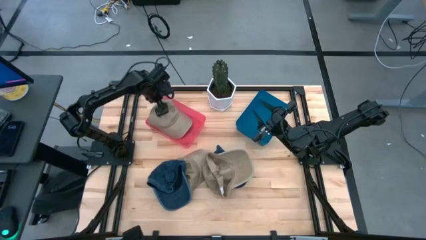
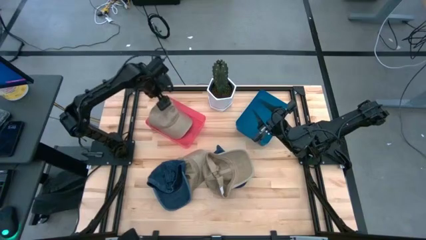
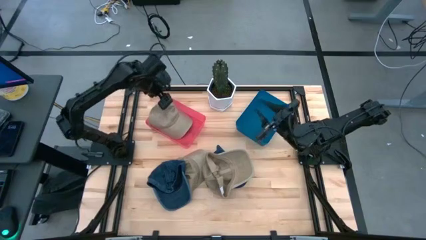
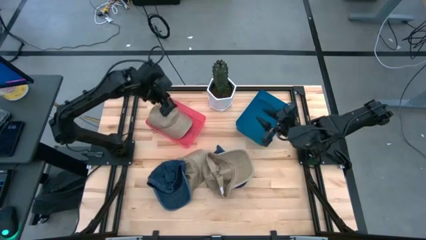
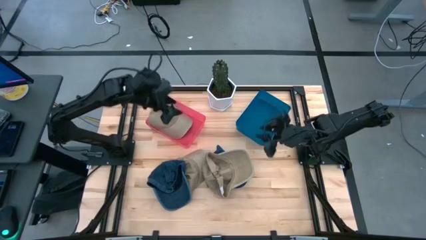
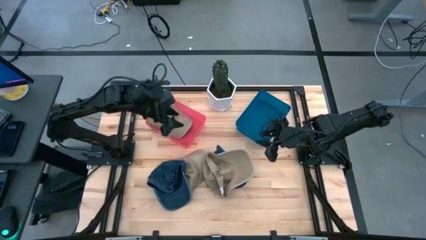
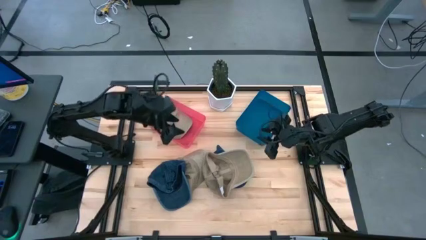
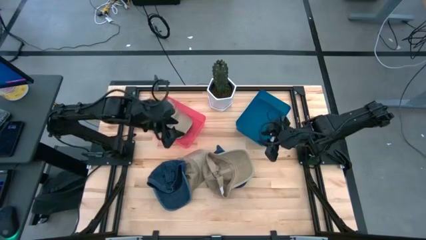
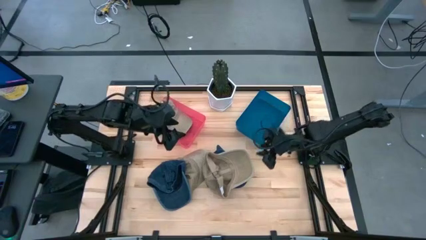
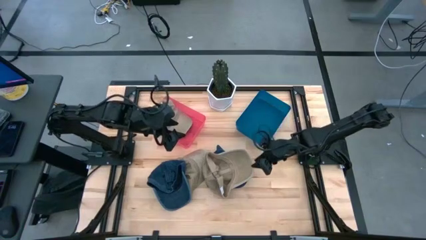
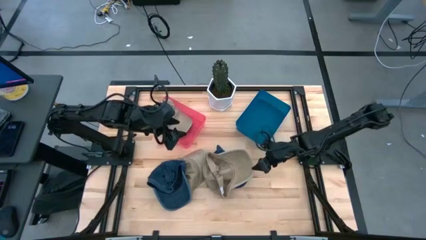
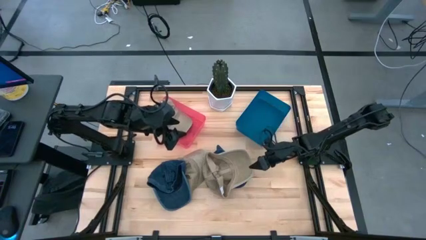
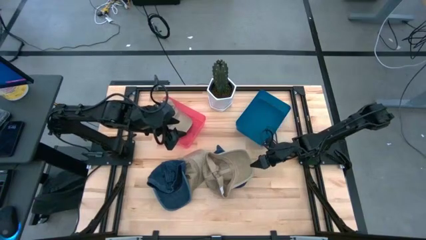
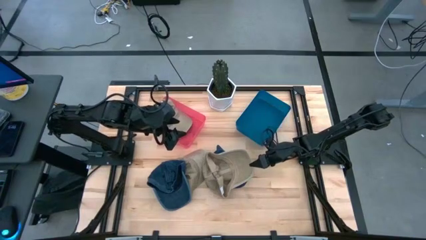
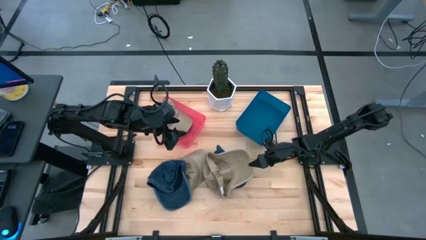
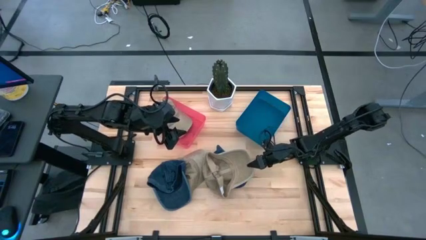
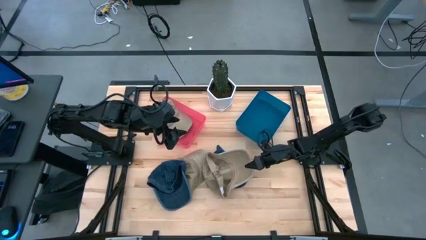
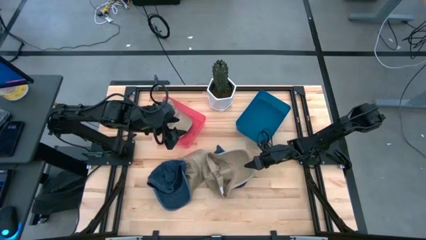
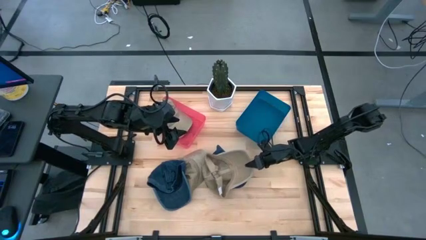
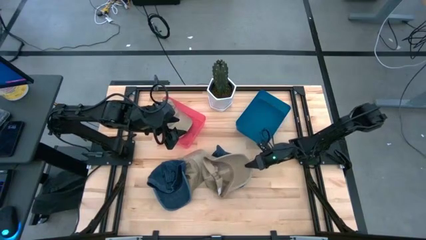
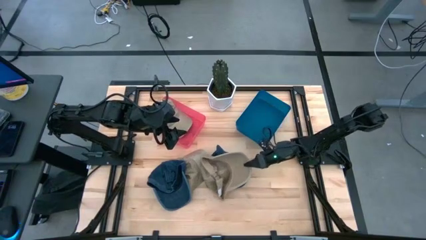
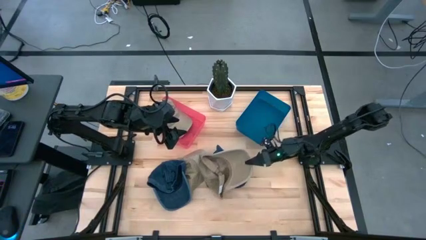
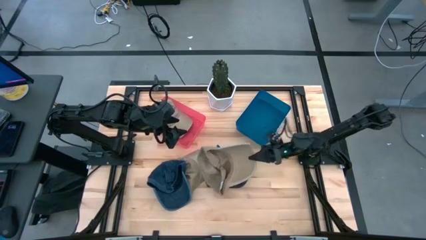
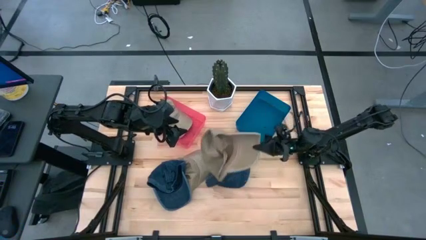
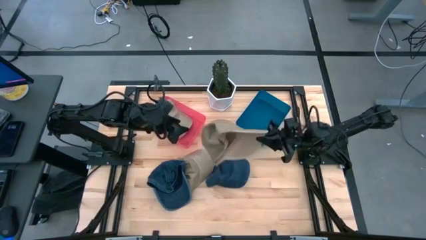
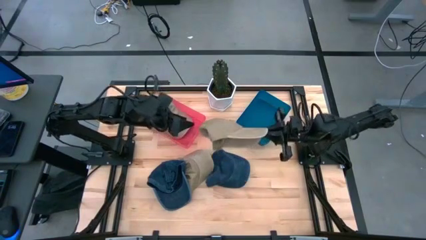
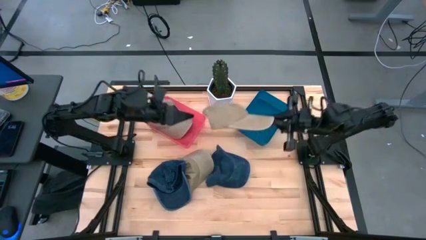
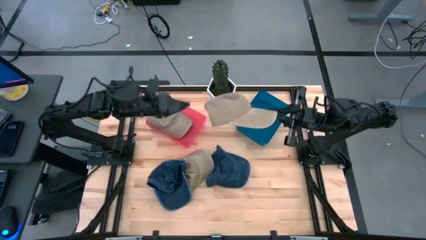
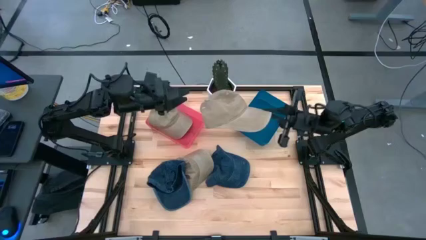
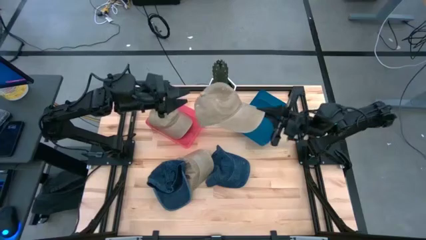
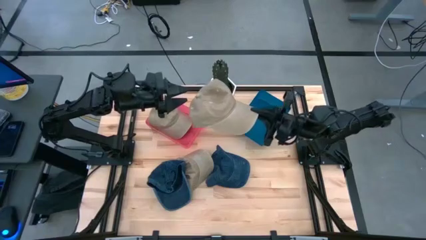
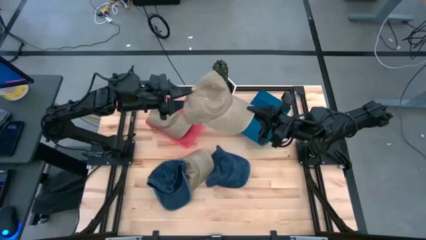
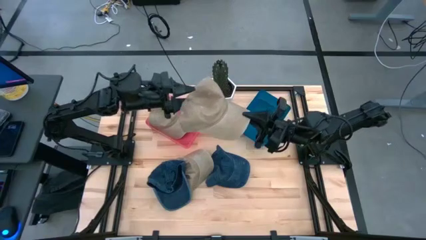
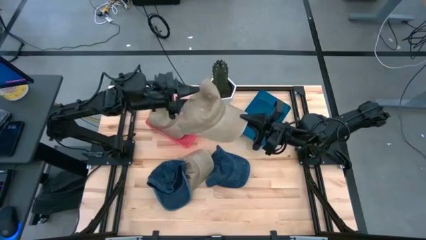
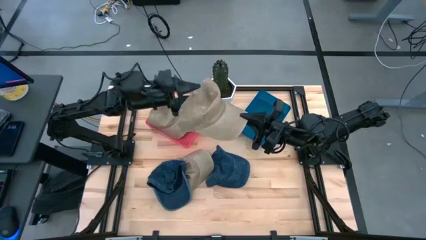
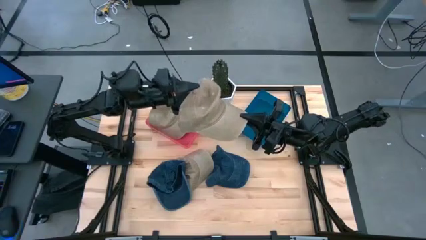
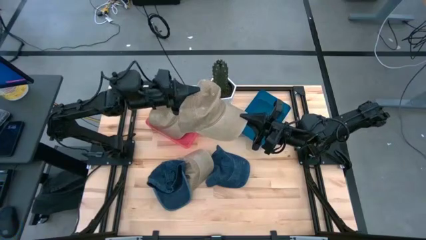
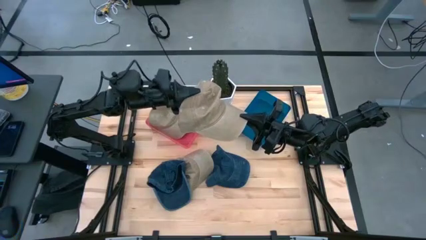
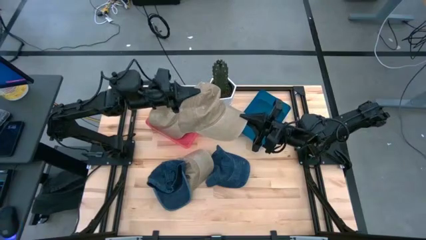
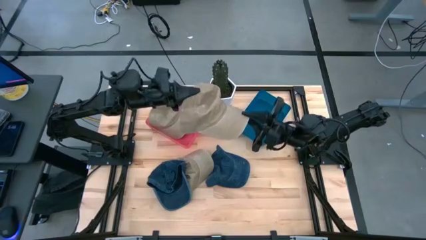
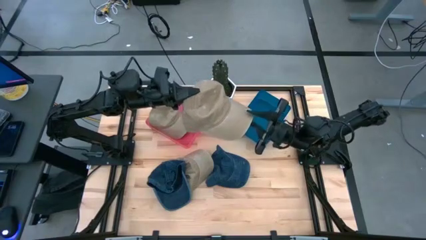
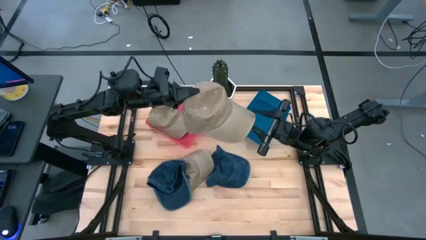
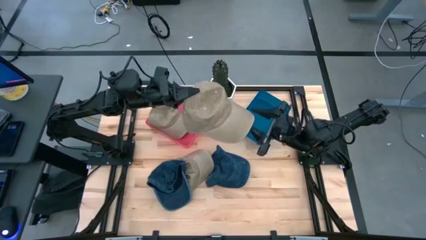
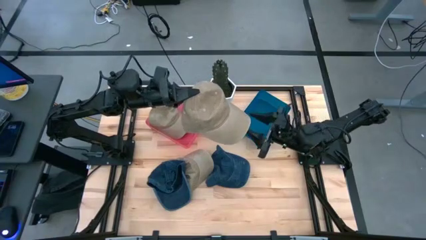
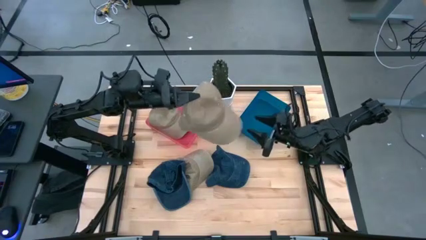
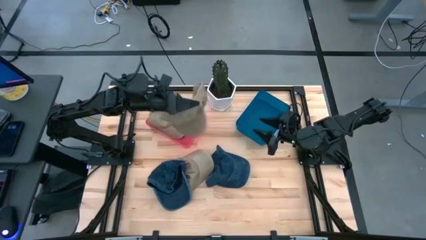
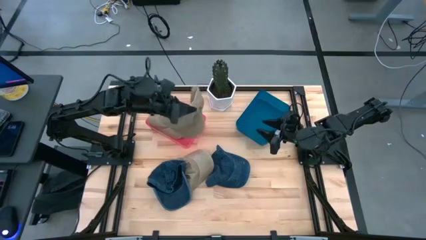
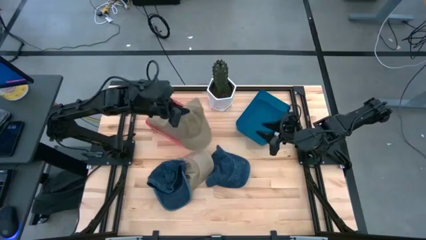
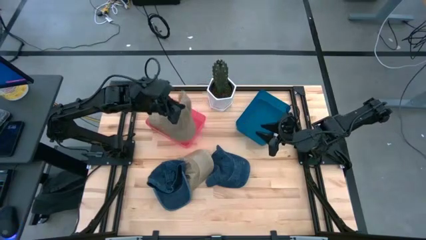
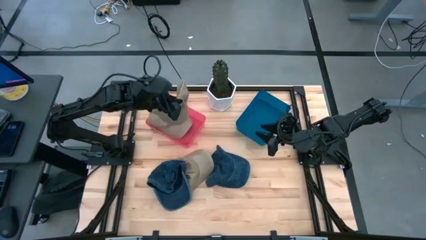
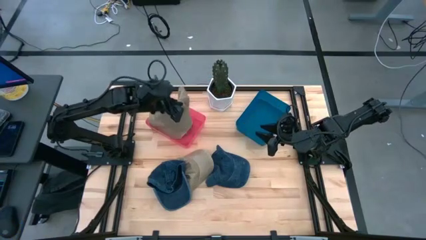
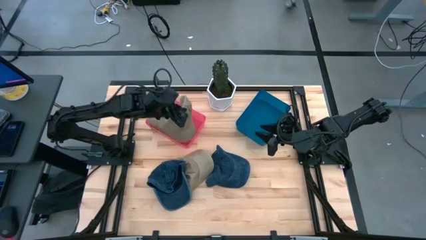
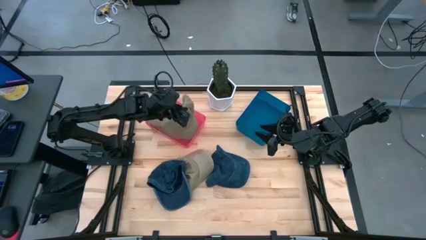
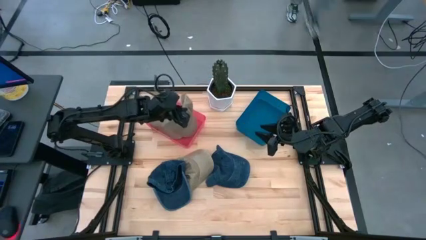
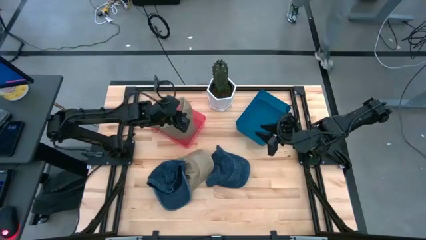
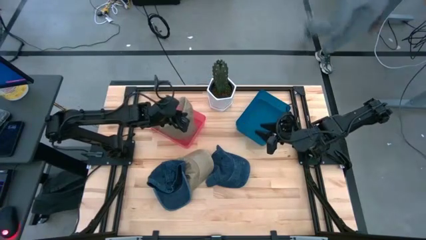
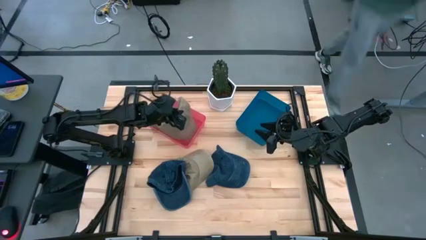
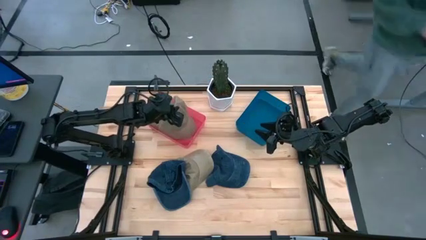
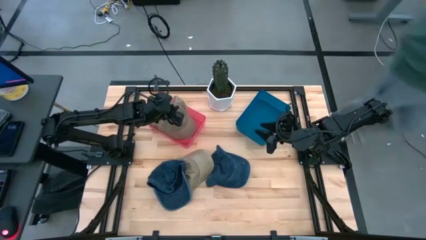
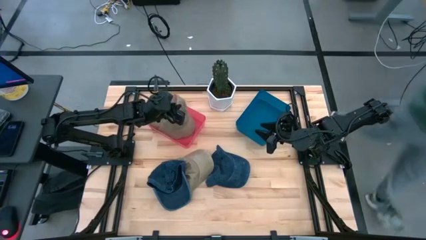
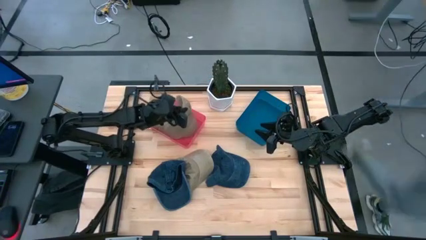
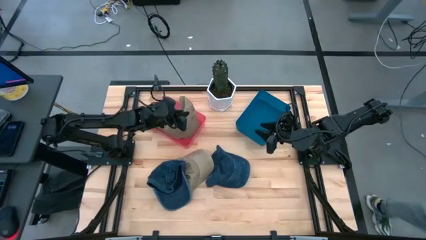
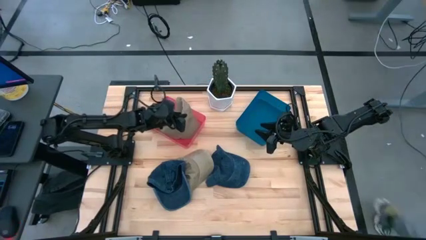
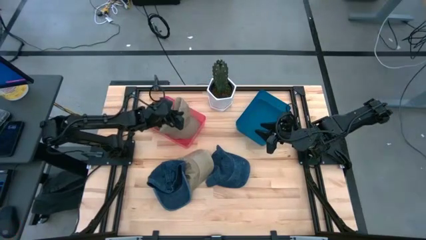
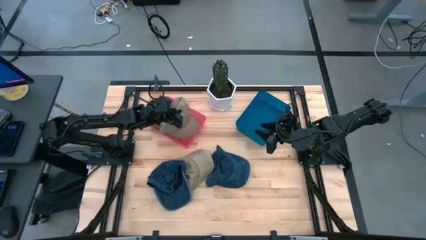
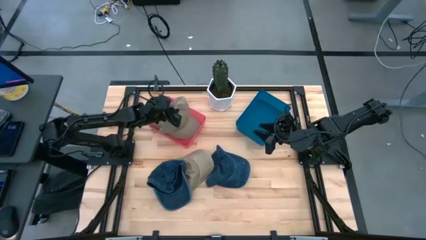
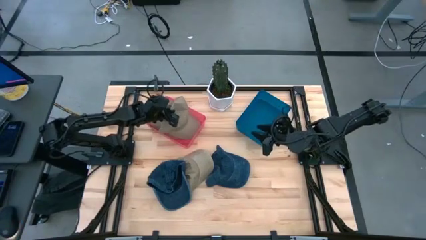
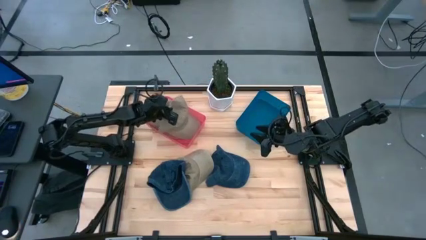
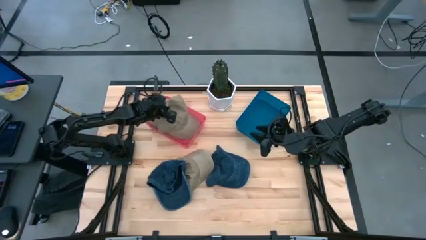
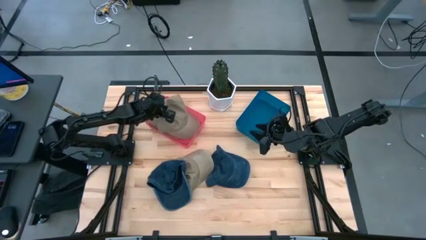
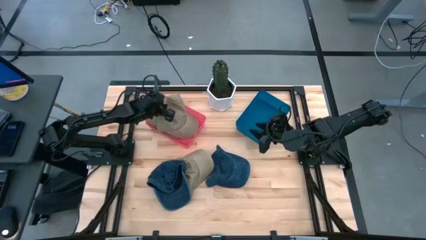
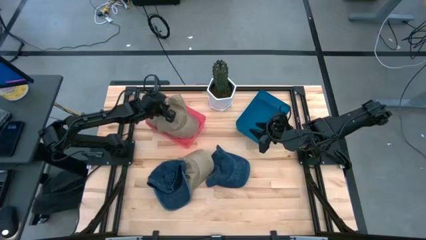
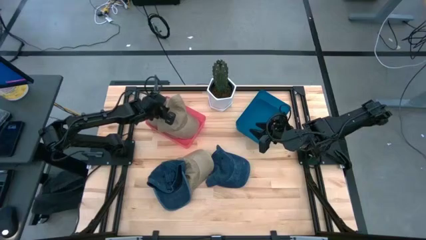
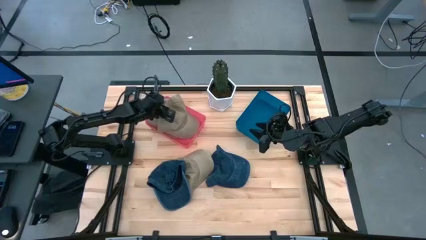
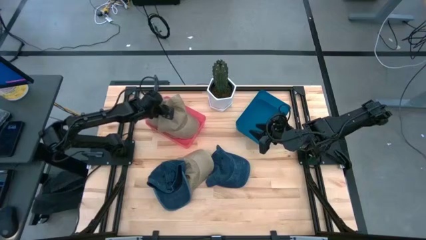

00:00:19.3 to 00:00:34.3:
Task: Pick & Place hat
Put the right brown cap into the red bin
